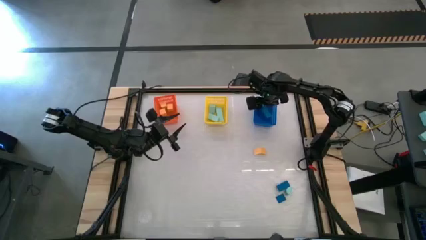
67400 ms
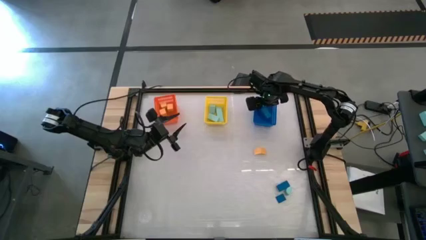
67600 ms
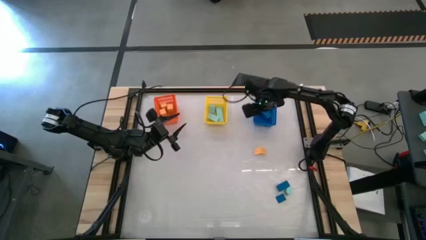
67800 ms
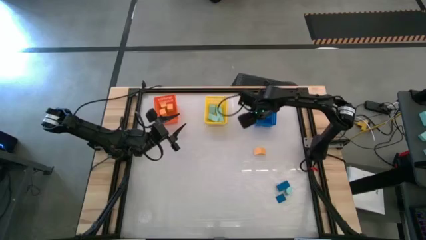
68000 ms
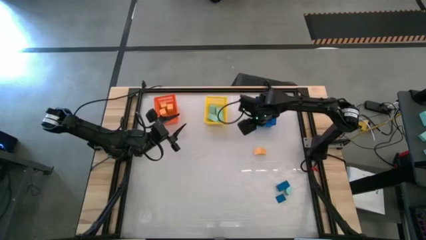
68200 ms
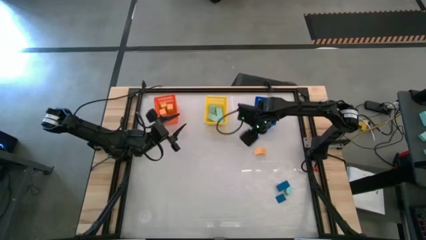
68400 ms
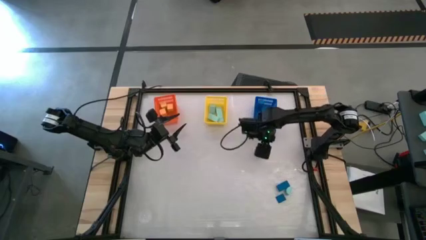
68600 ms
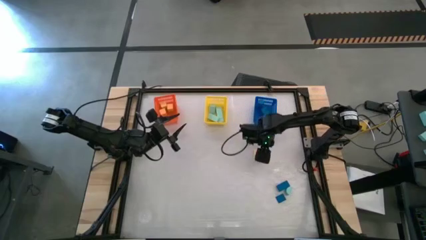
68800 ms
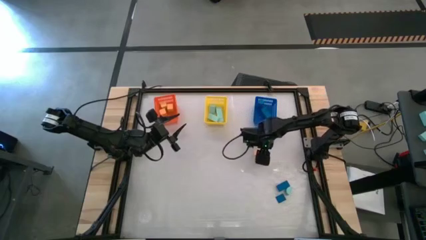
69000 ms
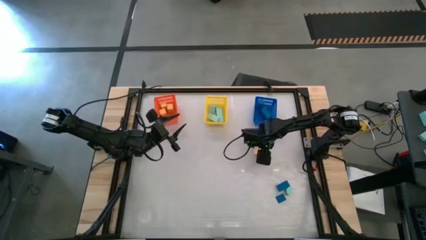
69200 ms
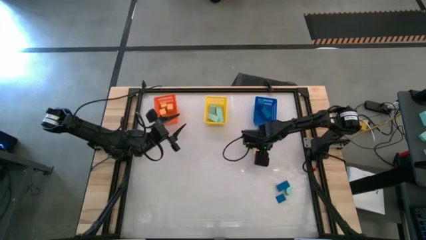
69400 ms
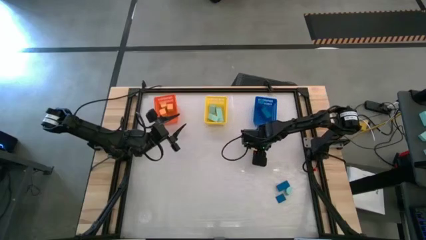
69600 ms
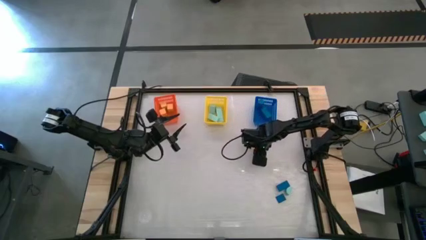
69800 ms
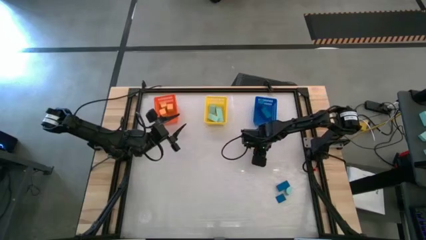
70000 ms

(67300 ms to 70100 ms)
Task: Sort & place blocks by color
Put the yellow block into the orange bin

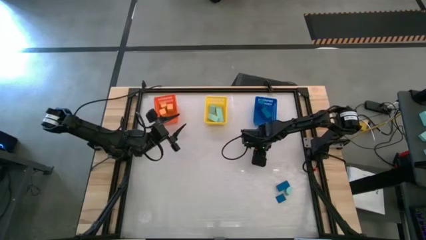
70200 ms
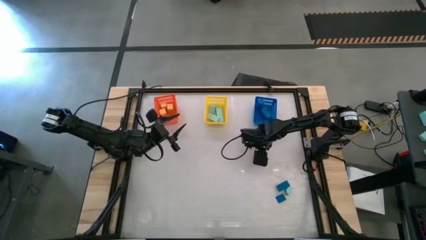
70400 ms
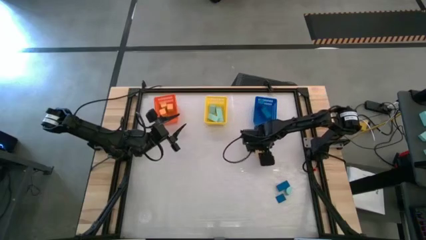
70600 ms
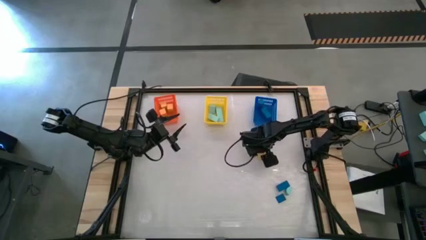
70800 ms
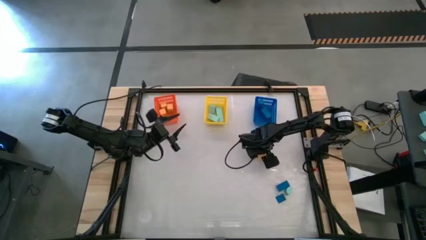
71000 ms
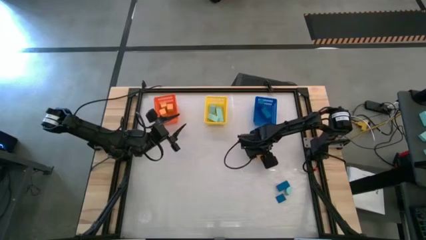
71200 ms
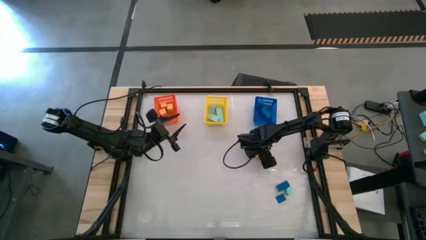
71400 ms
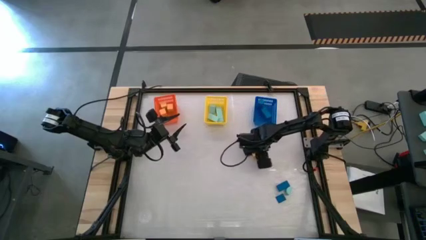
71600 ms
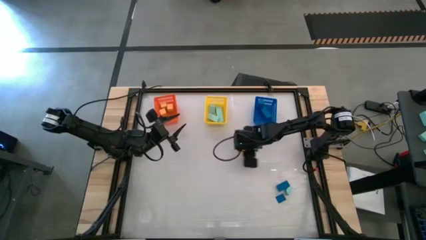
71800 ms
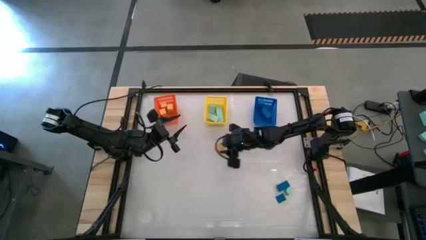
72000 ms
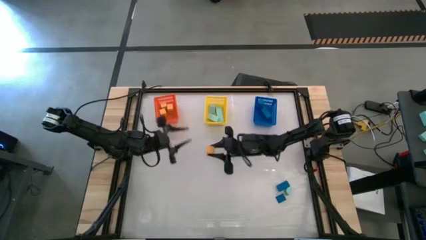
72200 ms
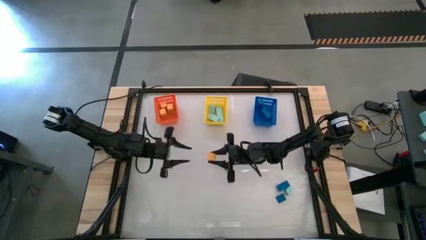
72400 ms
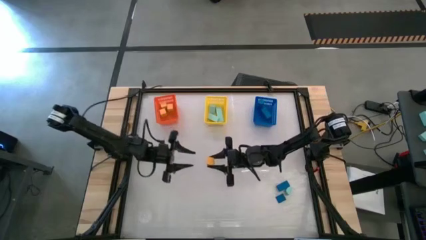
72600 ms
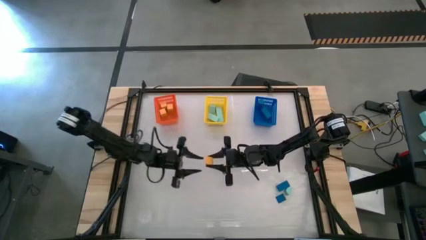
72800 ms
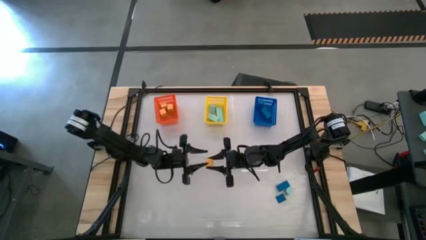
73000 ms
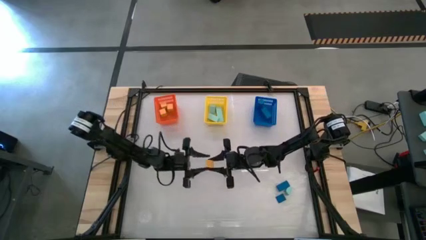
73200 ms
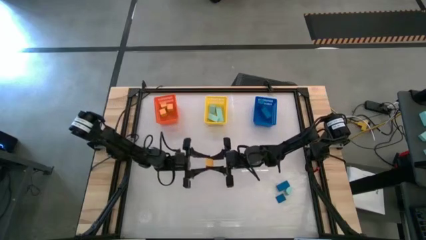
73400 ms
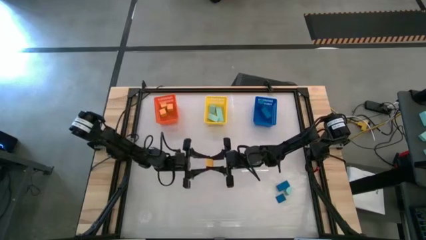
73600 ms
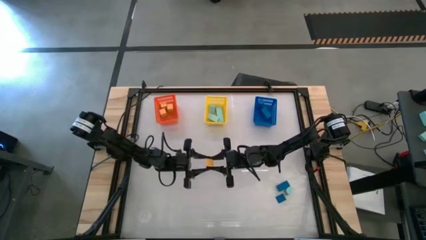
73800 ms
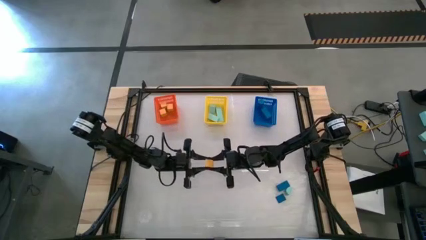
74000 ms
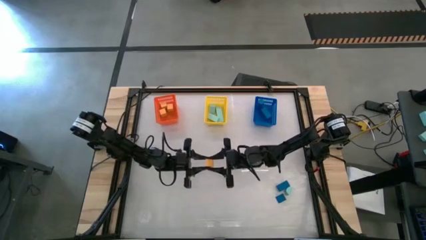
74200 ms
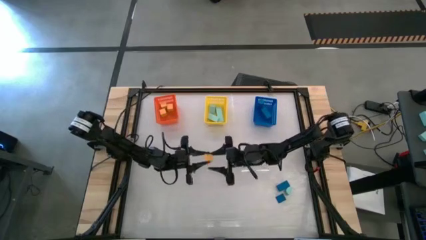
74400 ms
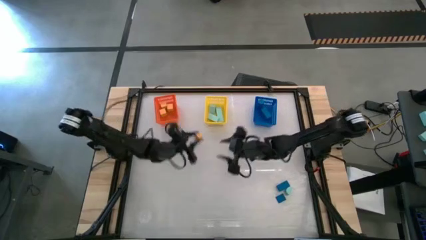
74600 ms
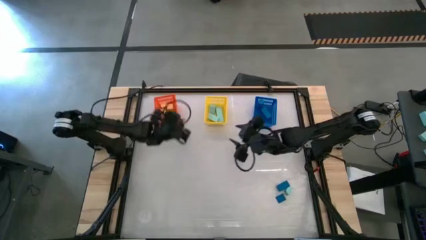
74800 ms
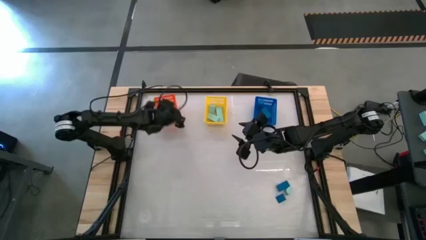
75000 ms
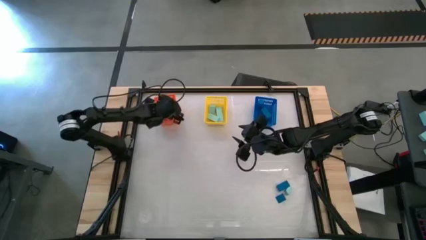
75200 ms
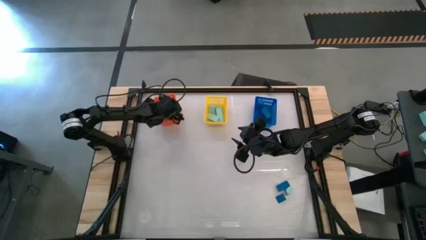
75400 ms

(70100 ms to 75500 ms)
Put the yellow block into the orange bin

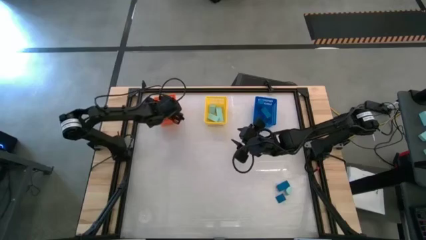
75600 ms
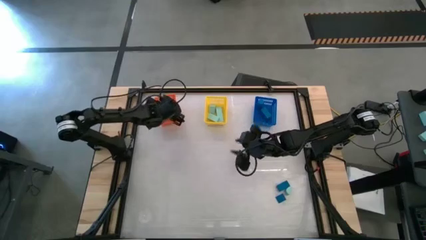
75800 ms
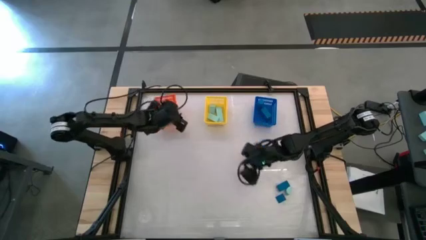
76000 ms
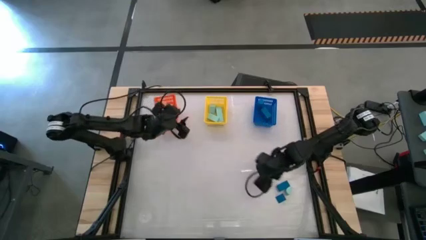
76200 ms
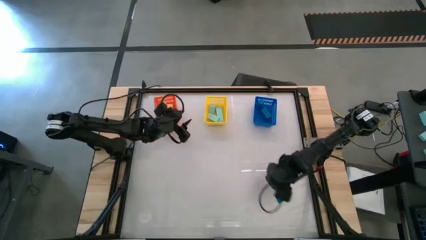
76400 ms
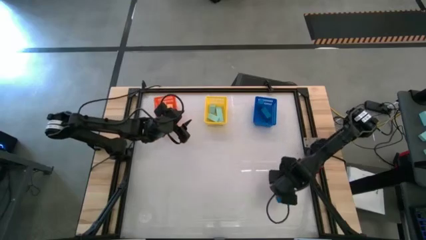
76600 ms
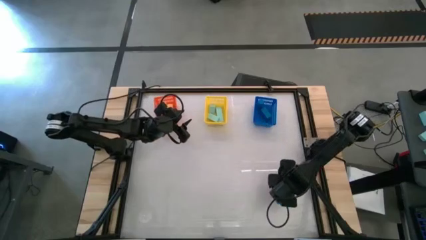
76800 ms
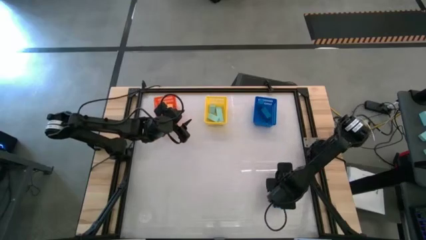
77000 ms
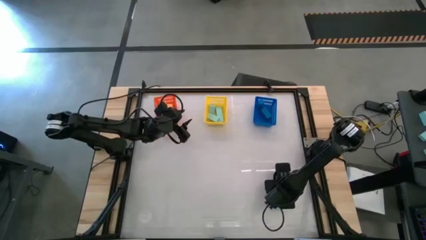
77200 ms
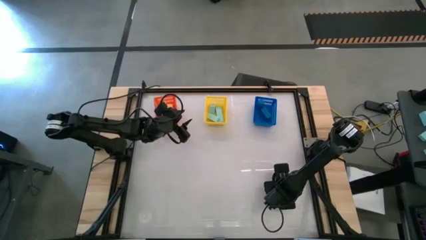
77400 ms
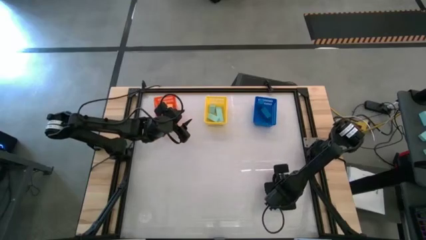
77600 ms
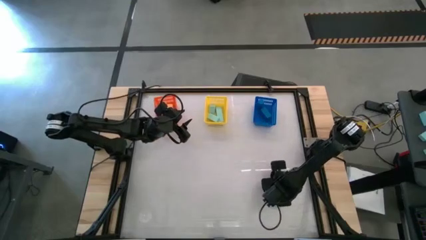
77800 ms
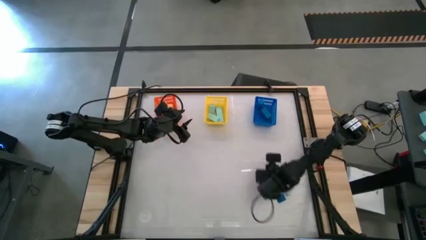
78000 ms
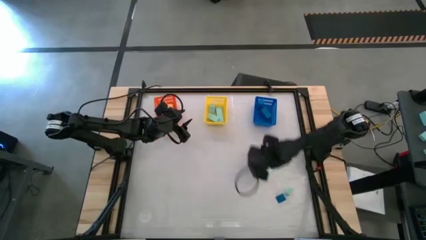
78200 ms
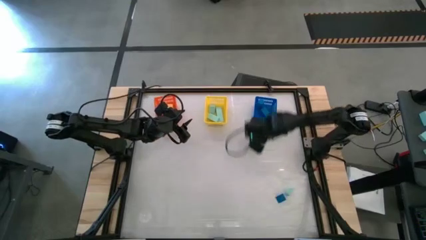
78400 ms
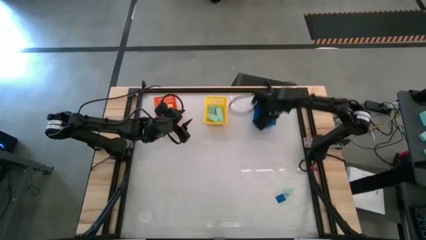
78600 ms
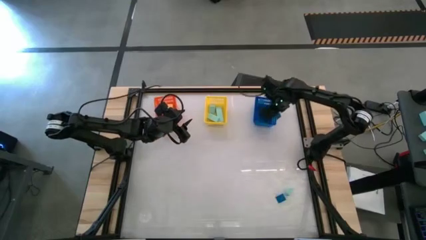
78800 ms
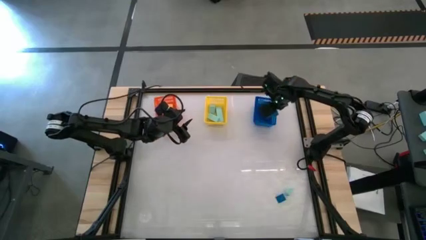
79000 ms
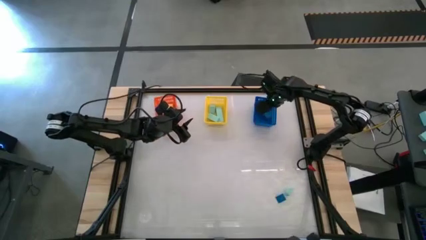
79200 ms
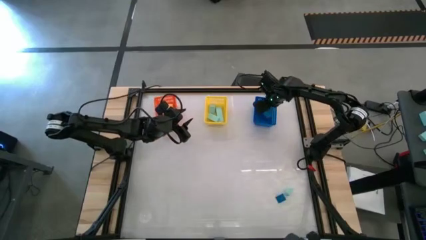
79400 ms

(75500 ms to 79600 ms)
Put the blue block into the blue bin

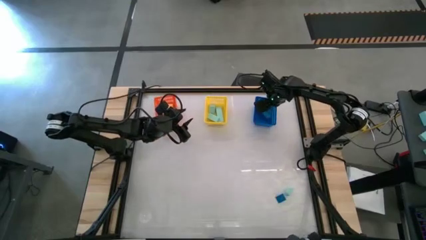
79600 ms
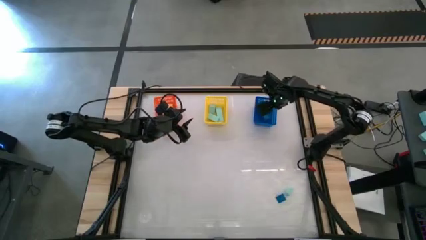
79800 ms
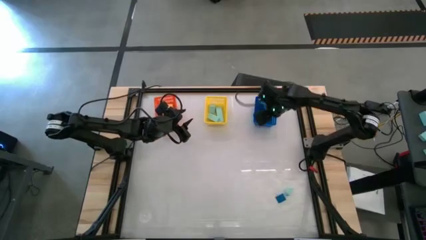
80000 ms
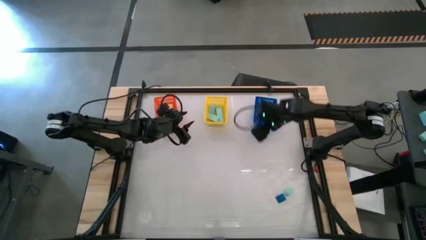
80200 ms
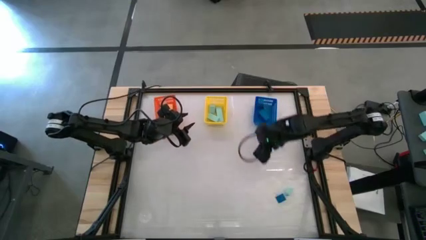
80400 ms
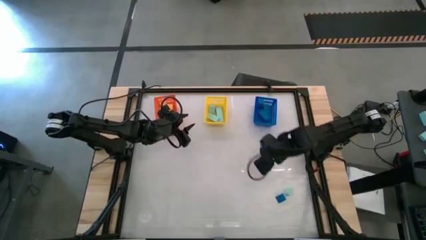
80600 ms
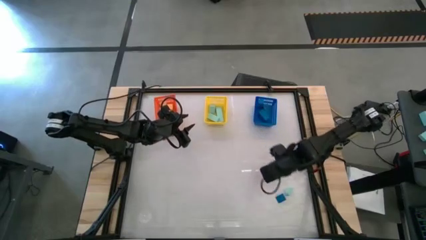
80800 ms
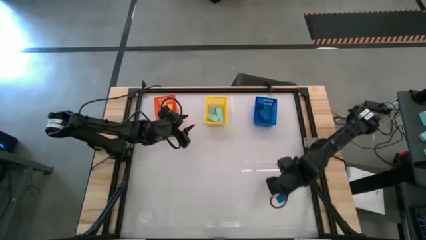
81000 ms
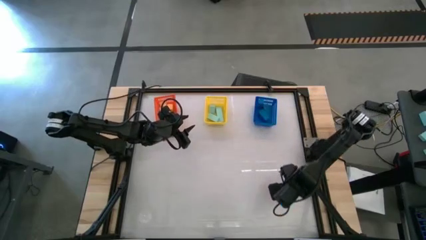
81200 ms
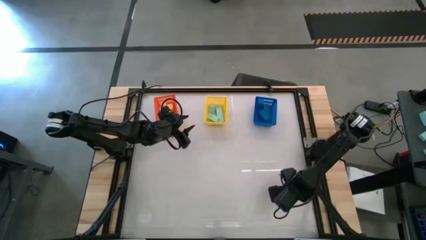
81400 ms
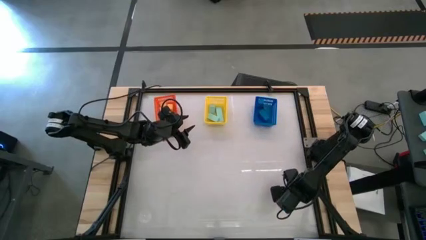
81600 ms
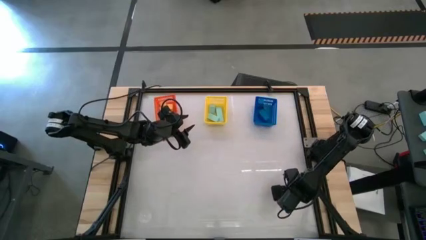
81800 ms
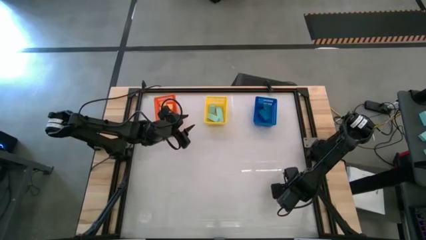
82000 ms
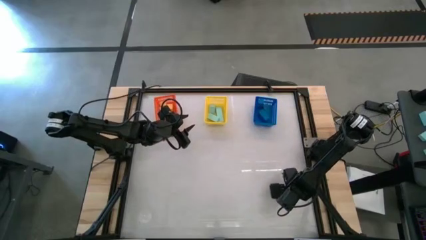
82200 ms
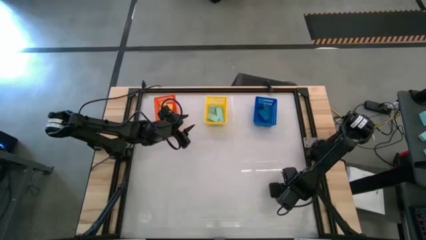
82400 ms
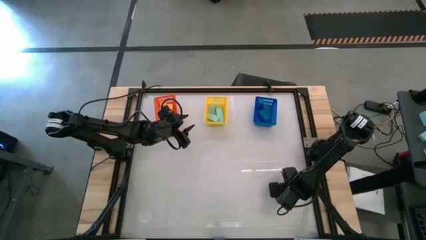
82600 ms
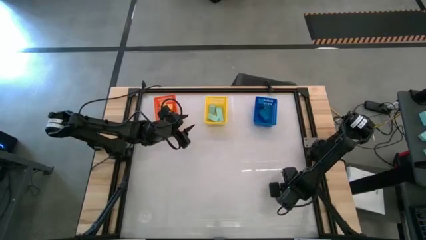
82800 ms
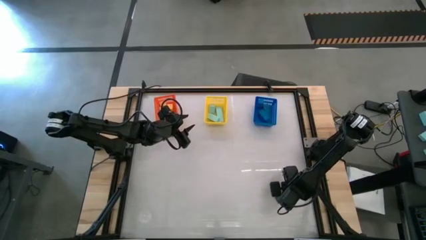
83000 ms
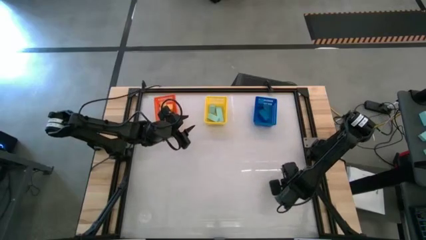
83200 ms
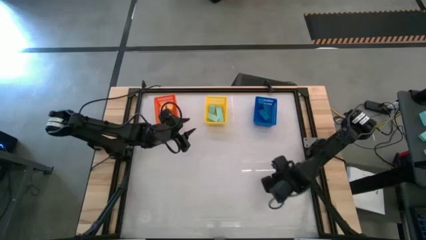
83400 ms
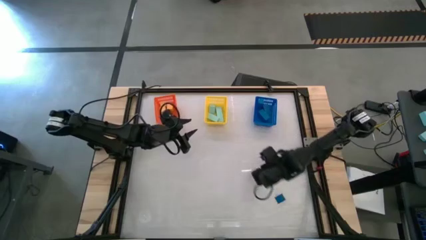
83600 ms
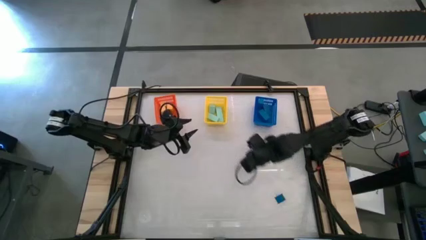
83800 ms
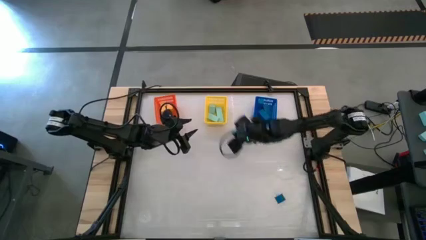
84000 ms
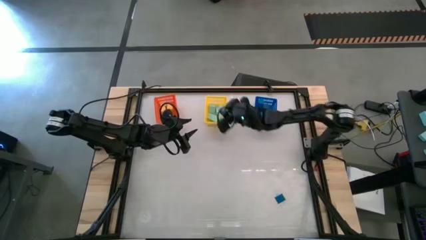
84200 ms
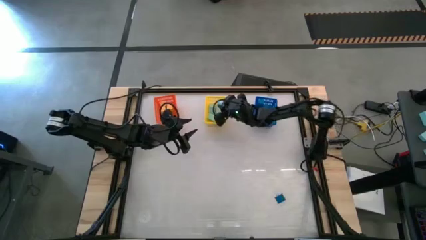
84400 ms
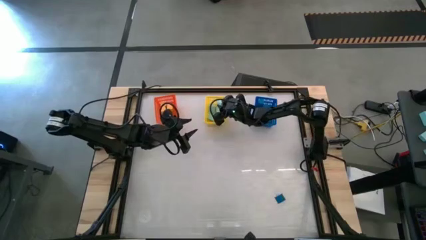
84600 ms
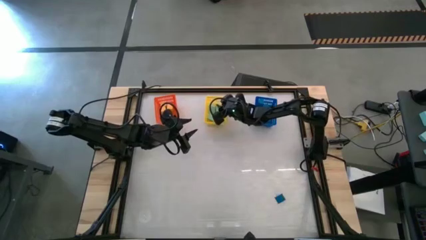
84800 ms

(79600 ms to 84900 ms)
Put the light blue block into the yellow bin
